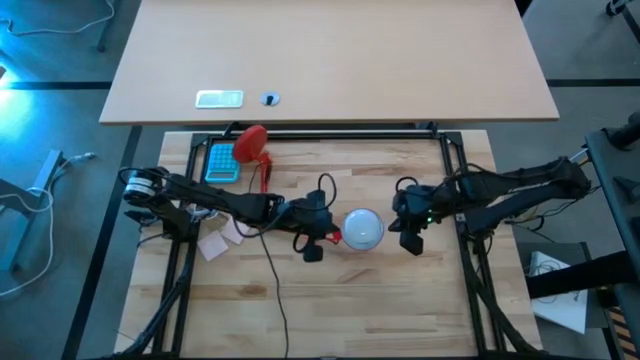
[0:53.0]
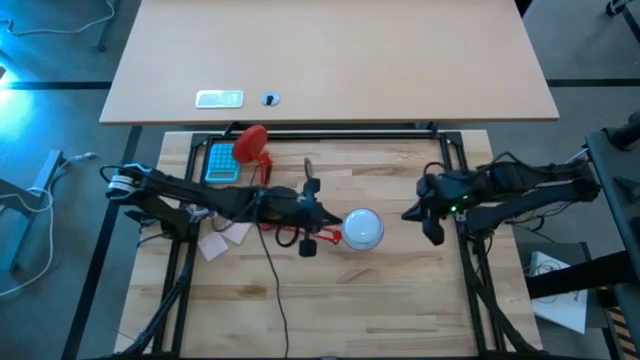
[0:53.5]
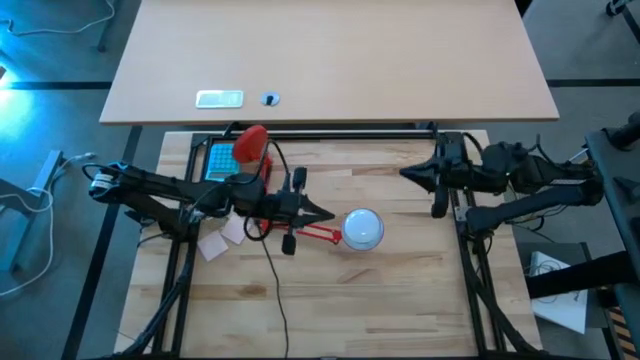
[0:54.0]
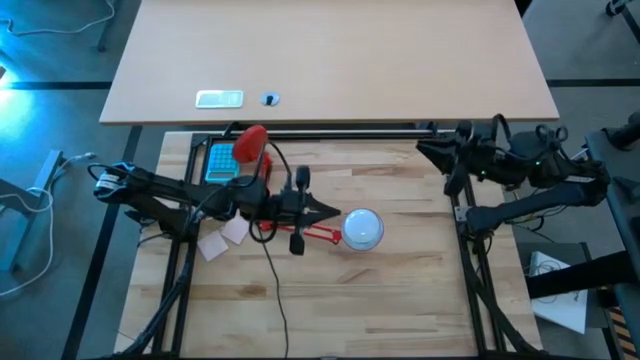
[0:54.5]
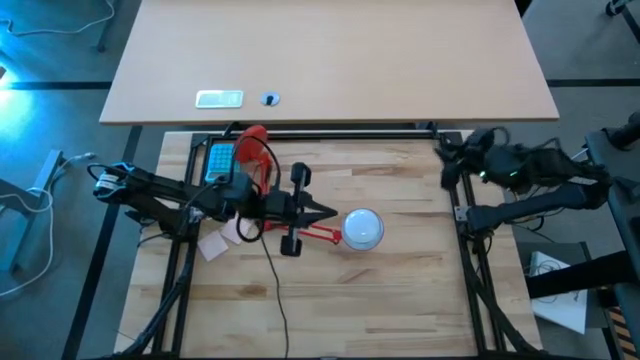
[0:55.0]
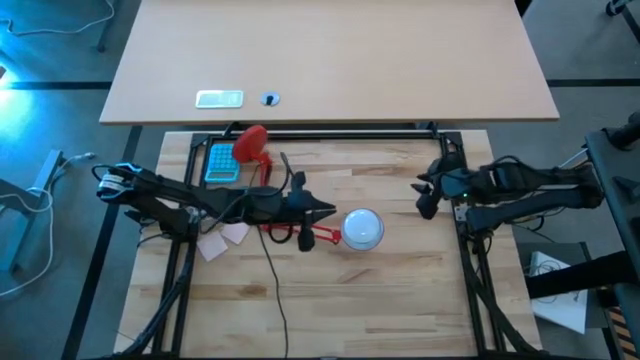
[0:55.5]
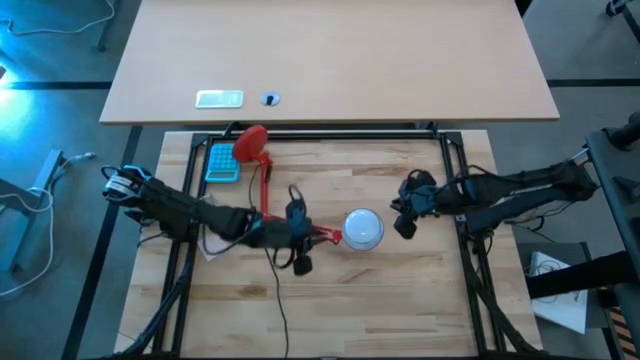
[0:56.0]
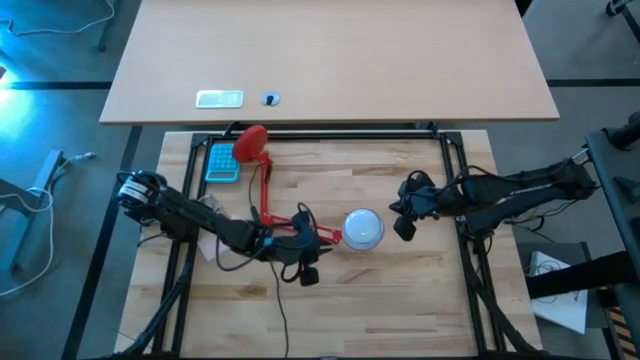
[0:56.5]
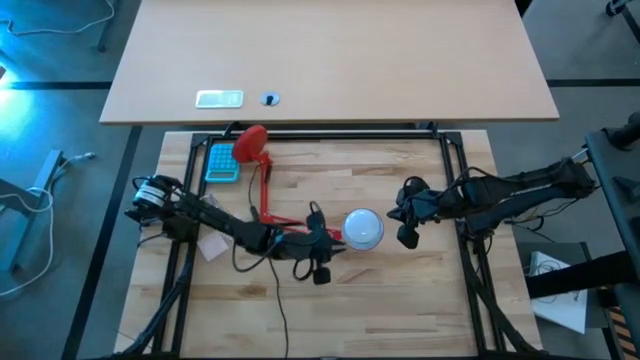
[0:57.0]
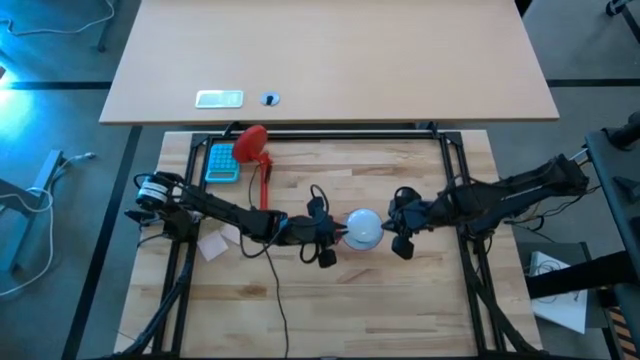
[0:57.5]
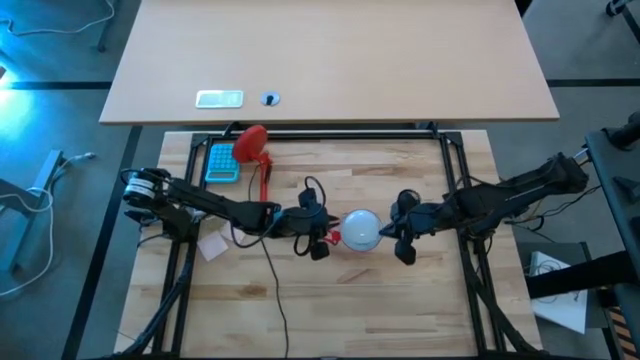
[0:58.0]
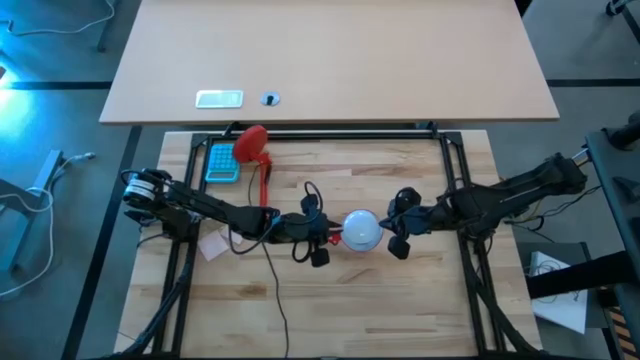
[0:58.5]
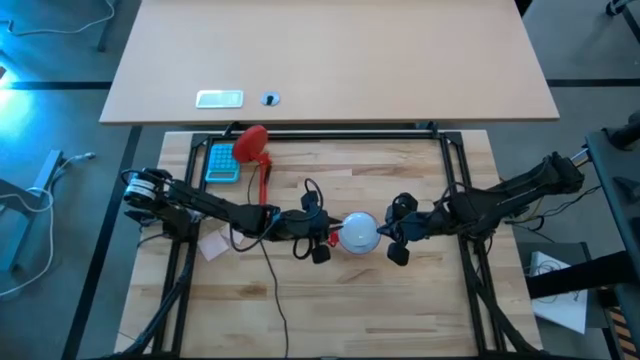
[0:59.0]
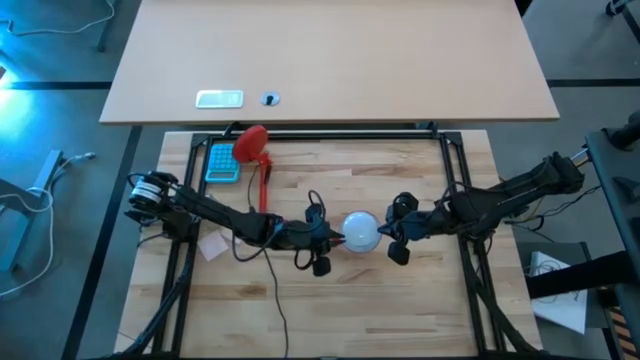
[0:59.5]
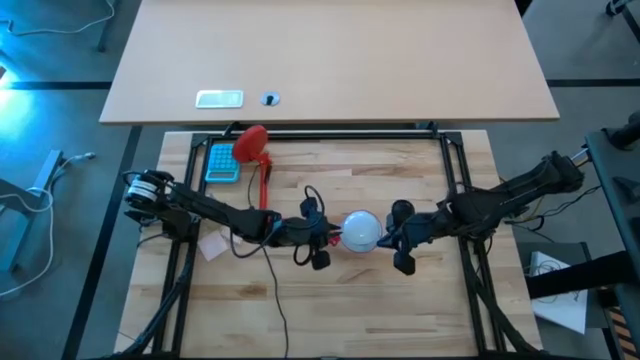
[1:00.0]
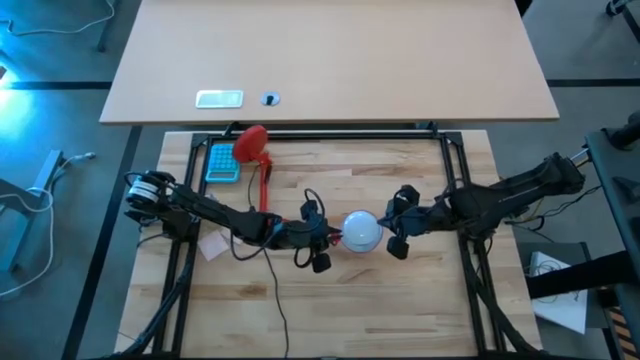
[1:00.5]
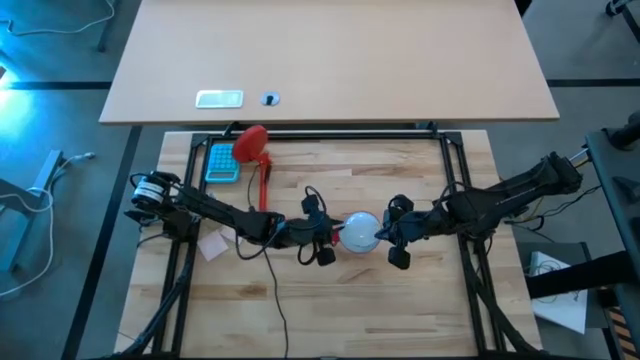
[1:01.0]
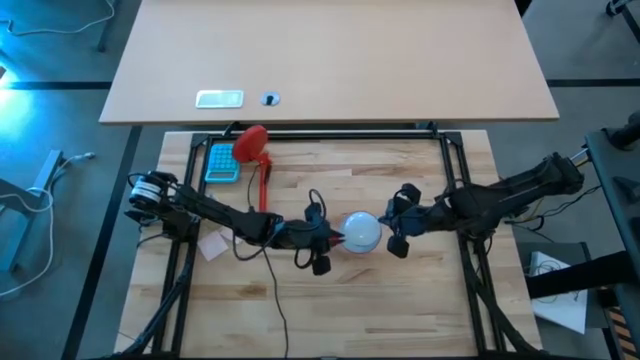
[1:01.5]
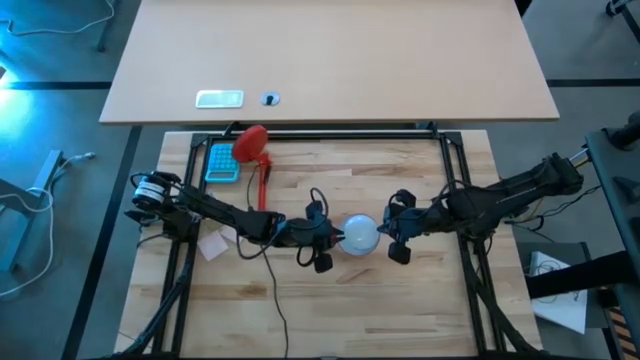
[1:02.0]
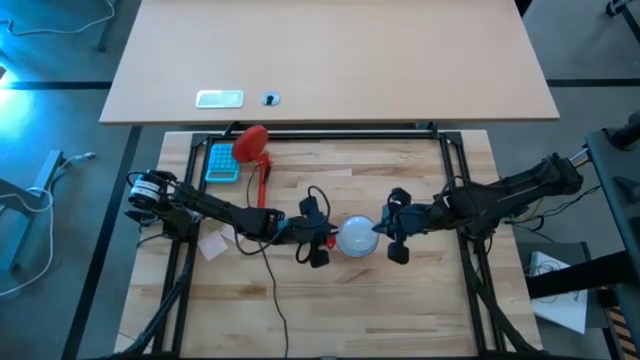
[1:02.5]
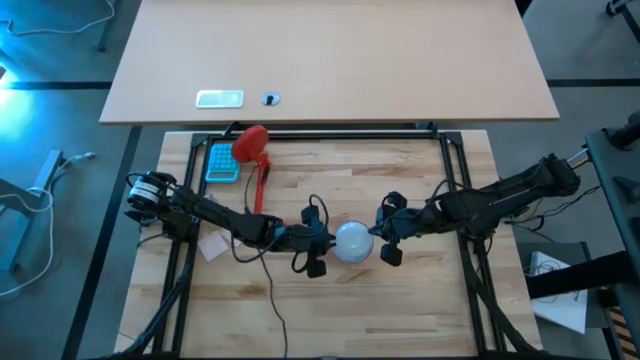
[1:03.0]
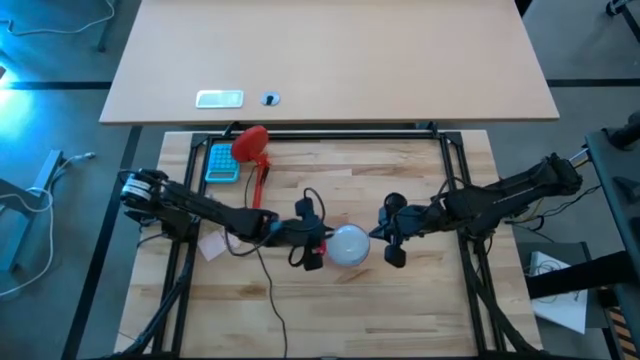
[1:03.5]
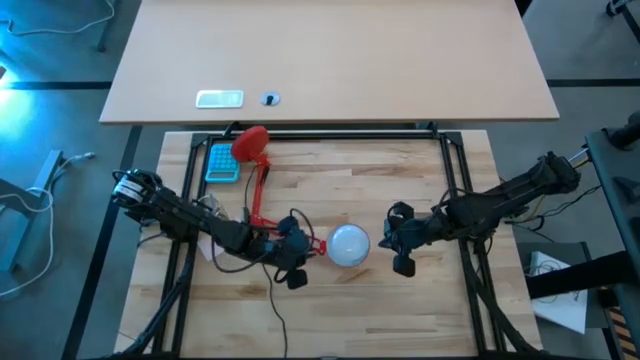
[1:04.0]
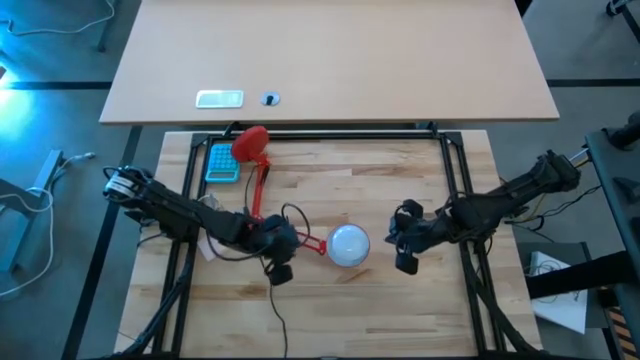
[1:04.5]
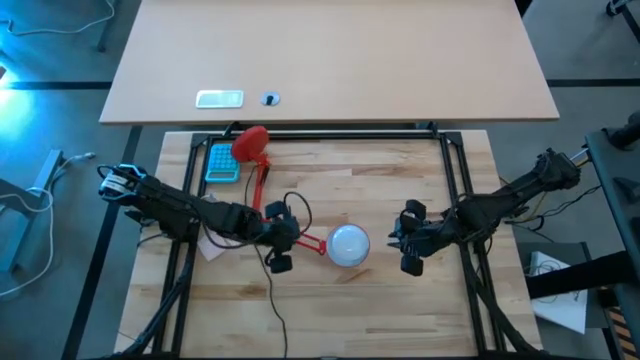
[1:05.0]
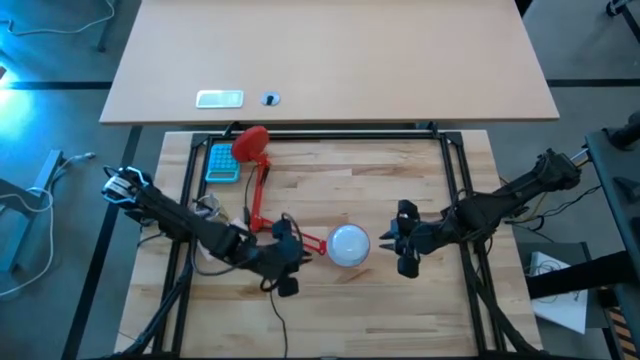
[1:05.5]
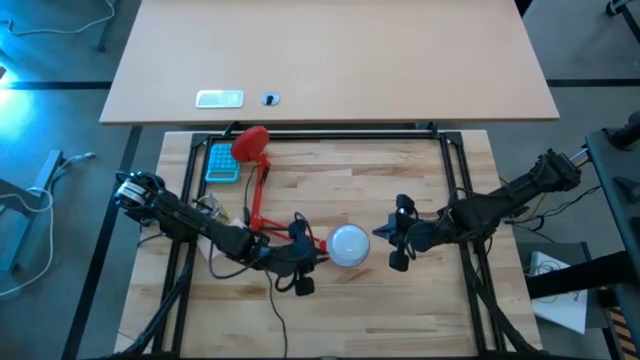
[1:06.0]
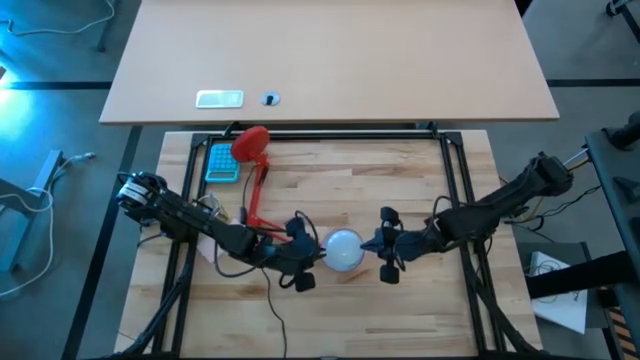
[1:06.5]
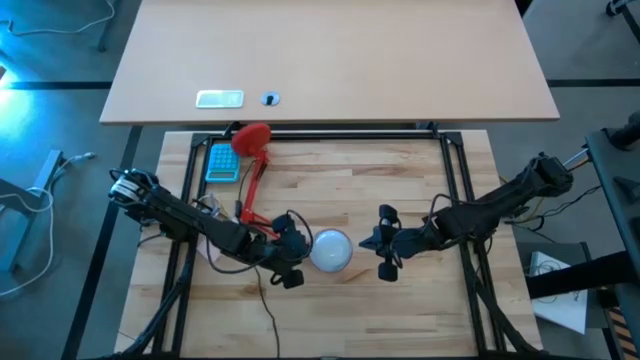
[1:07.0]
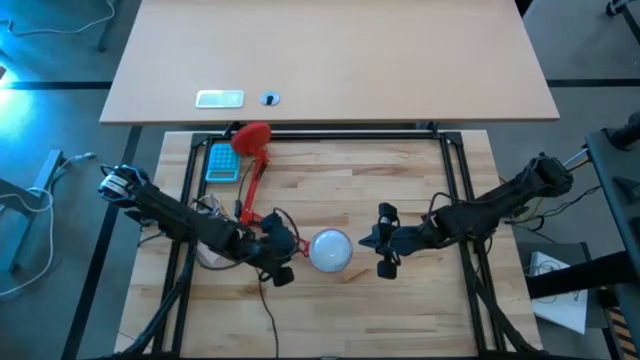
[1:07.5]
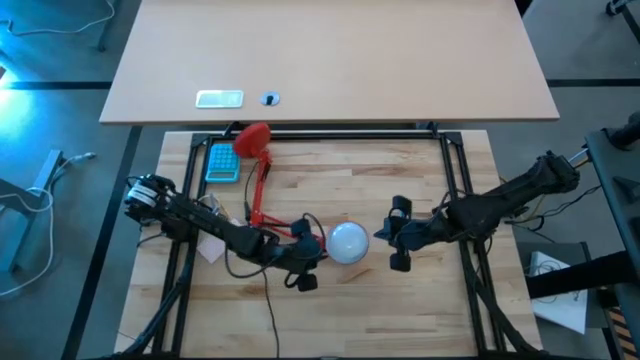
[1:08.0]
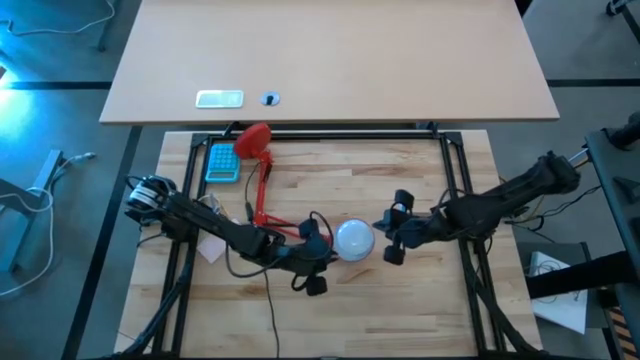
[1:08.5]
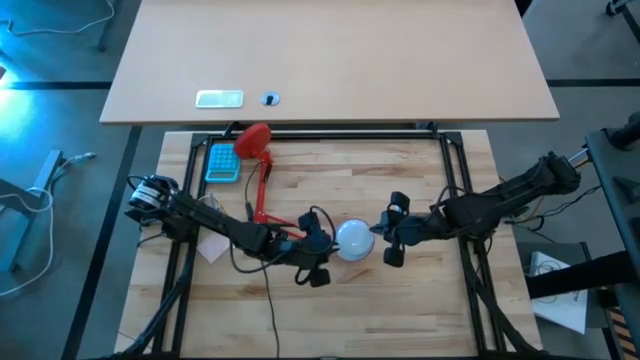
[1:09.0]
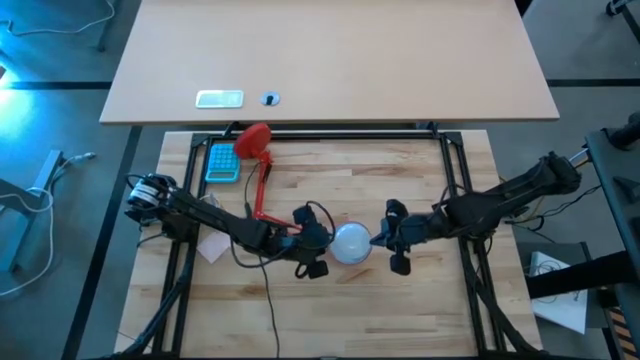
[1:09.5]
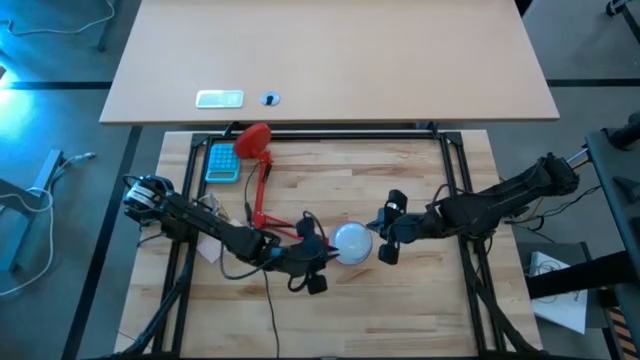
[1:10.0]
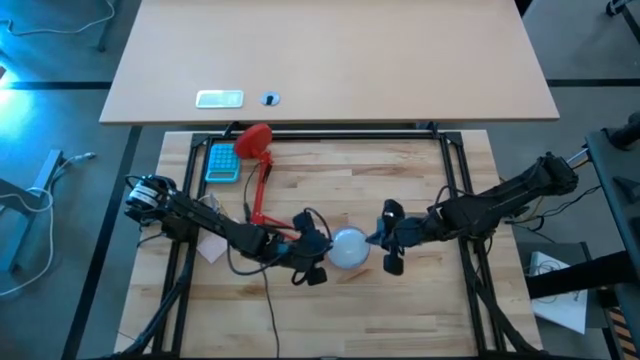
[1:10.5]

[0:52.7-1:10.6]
Task: Screw lightbulb
Remove the light bulb from the lamp
